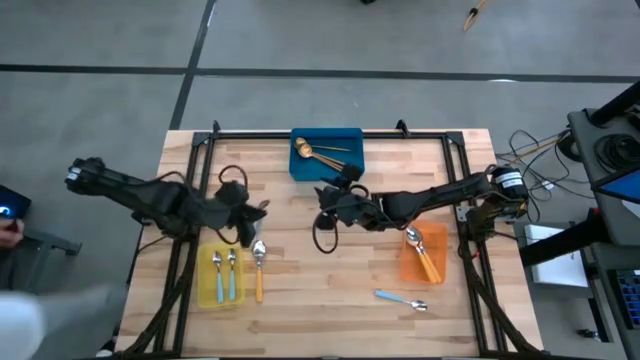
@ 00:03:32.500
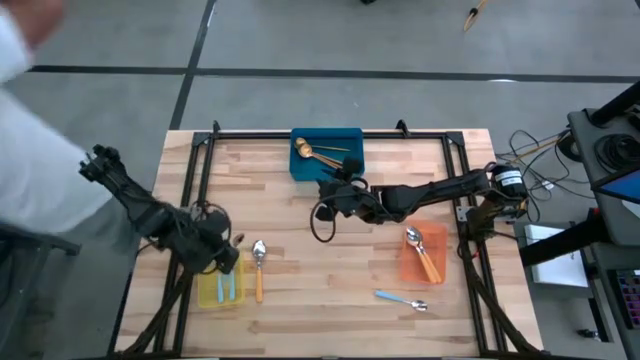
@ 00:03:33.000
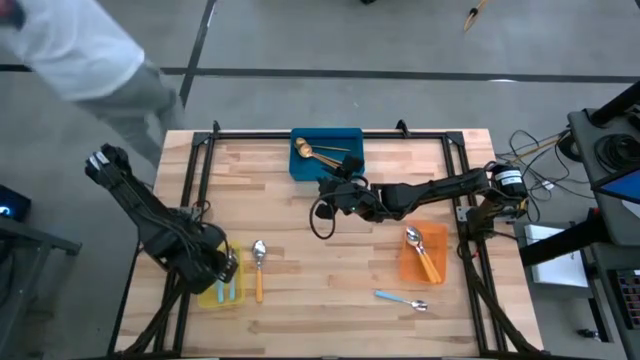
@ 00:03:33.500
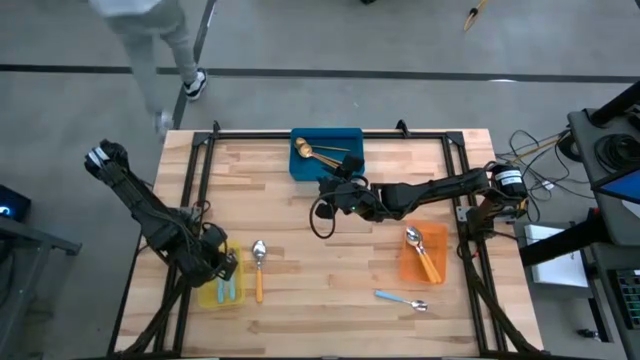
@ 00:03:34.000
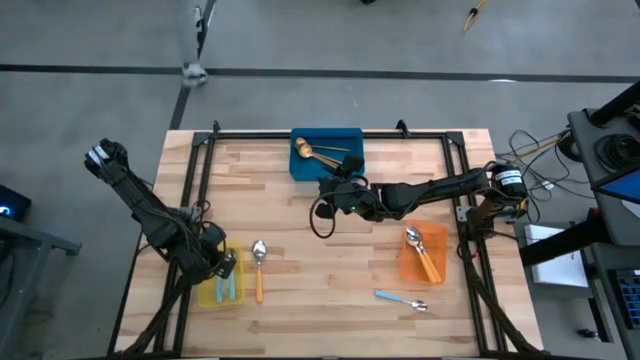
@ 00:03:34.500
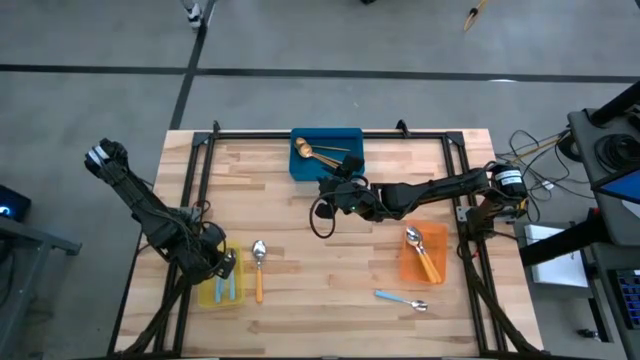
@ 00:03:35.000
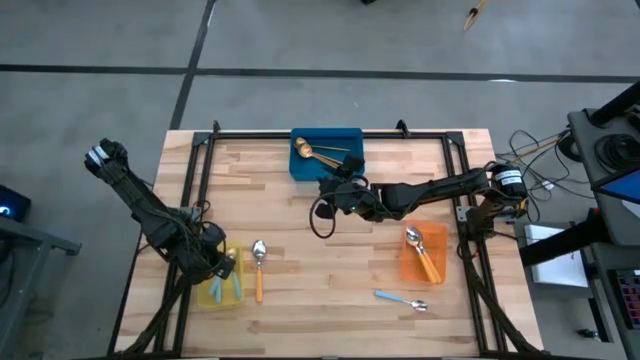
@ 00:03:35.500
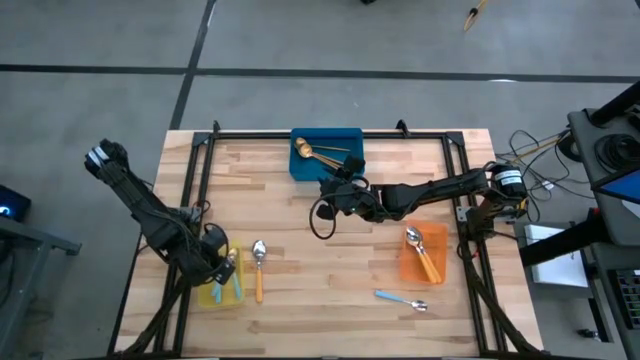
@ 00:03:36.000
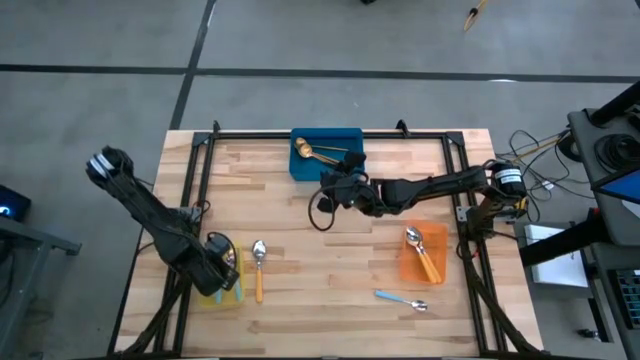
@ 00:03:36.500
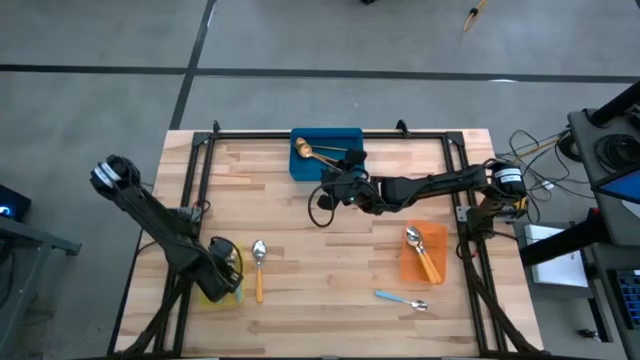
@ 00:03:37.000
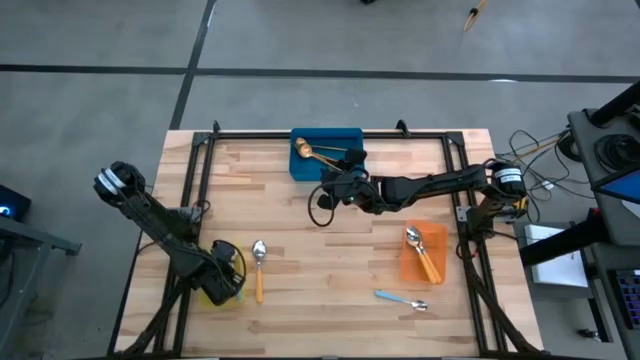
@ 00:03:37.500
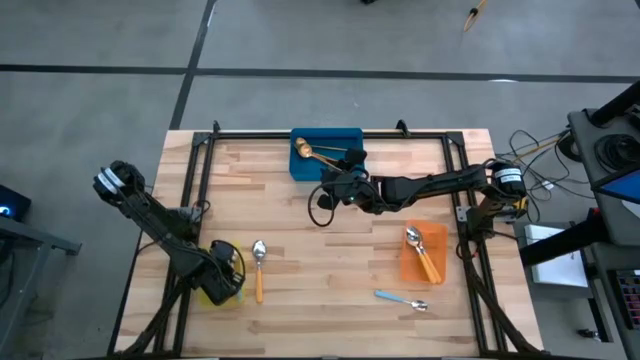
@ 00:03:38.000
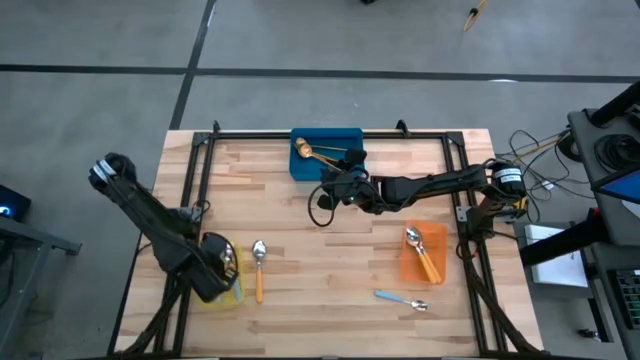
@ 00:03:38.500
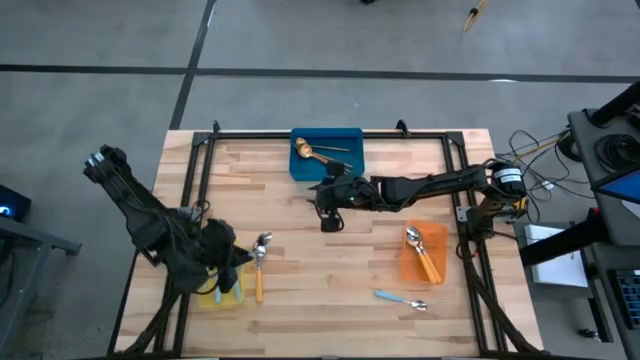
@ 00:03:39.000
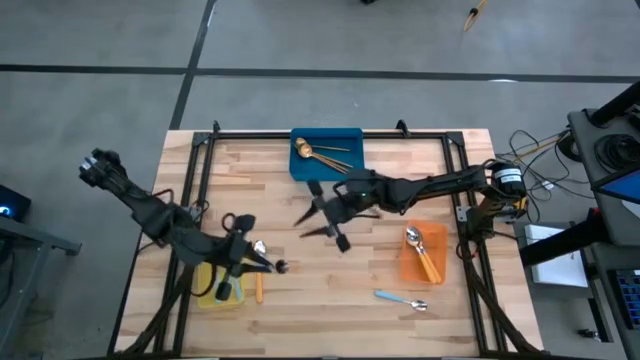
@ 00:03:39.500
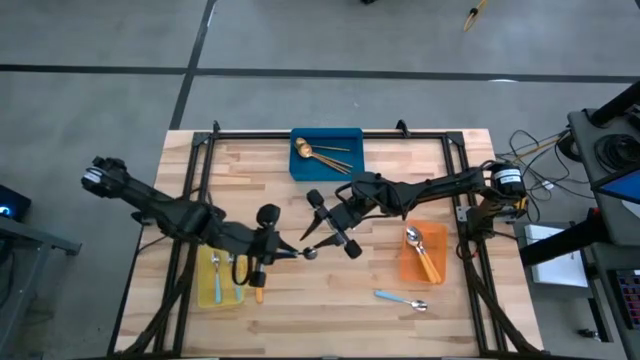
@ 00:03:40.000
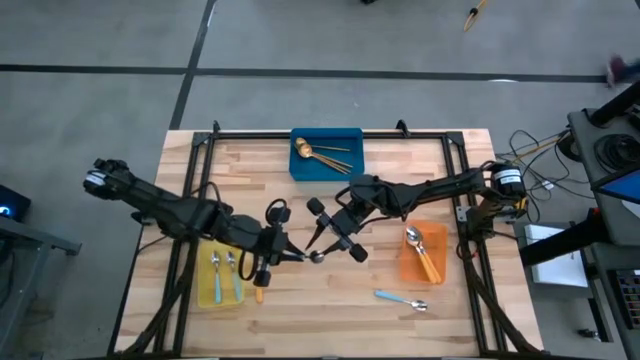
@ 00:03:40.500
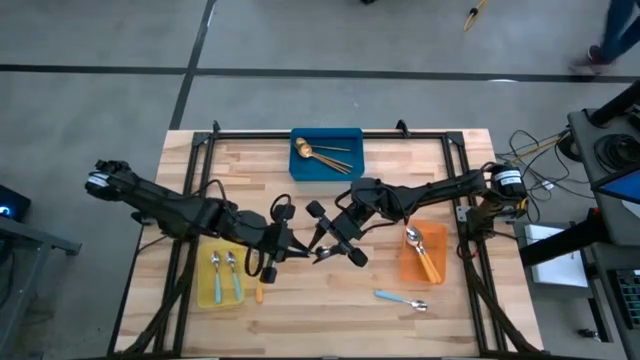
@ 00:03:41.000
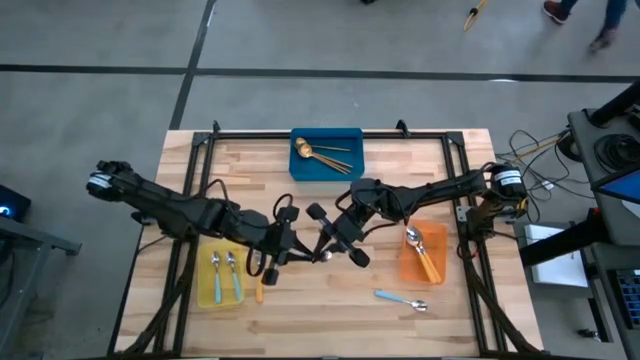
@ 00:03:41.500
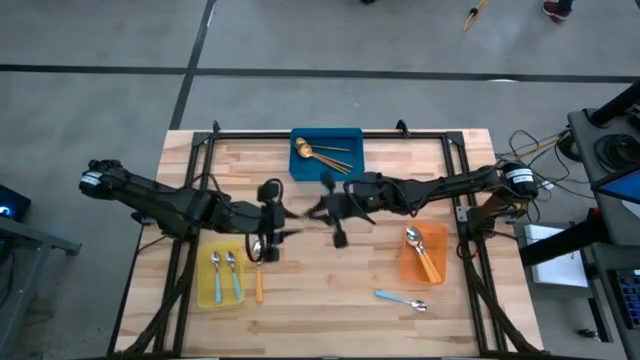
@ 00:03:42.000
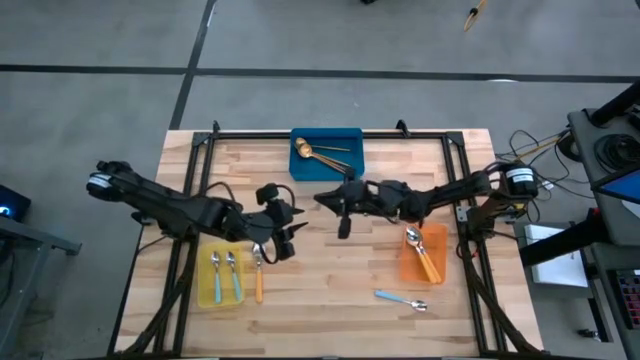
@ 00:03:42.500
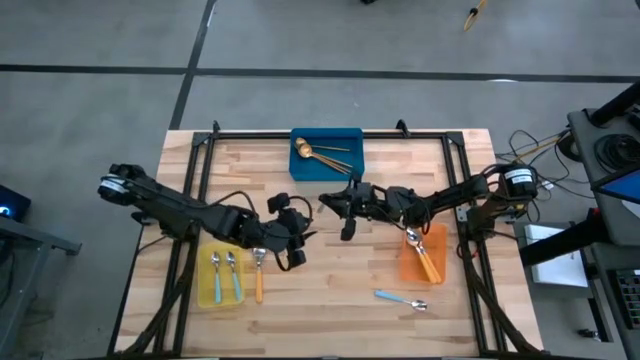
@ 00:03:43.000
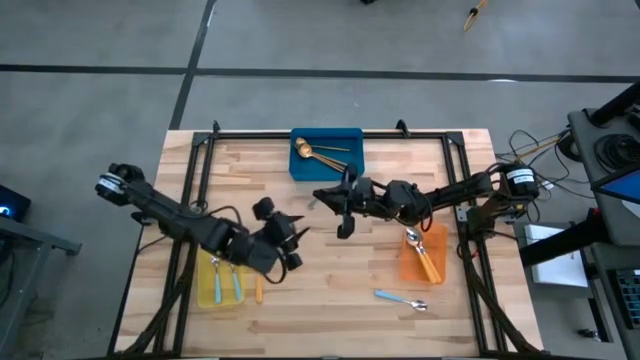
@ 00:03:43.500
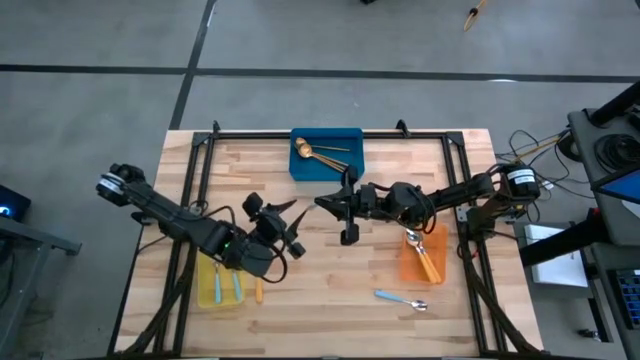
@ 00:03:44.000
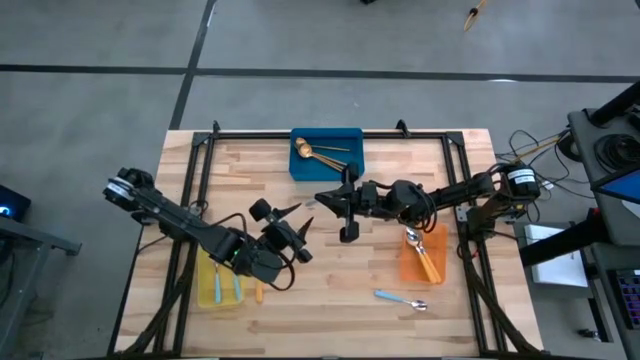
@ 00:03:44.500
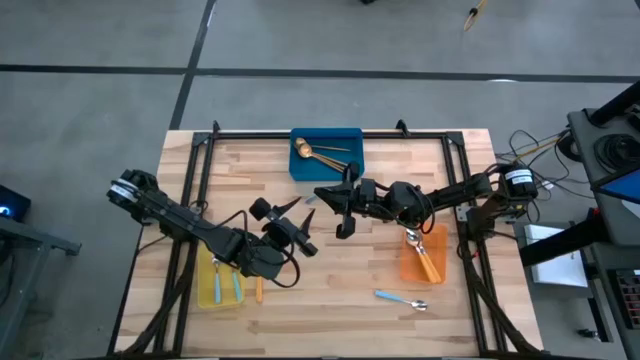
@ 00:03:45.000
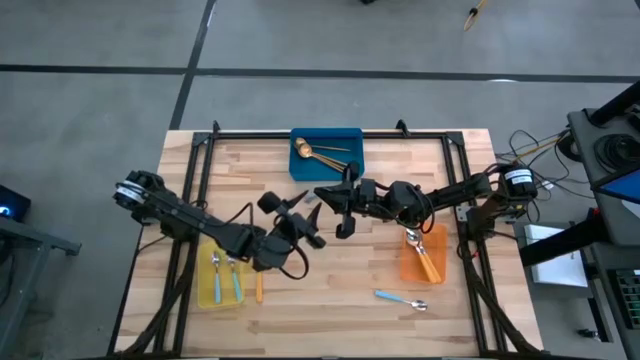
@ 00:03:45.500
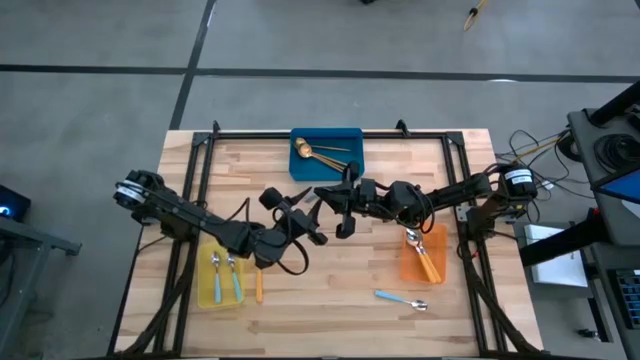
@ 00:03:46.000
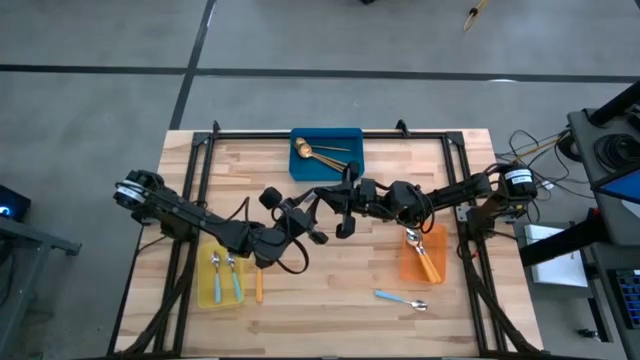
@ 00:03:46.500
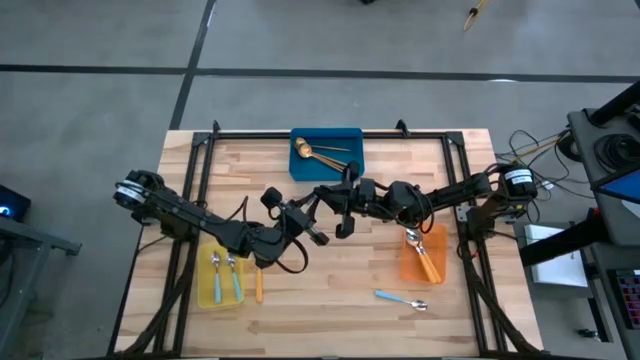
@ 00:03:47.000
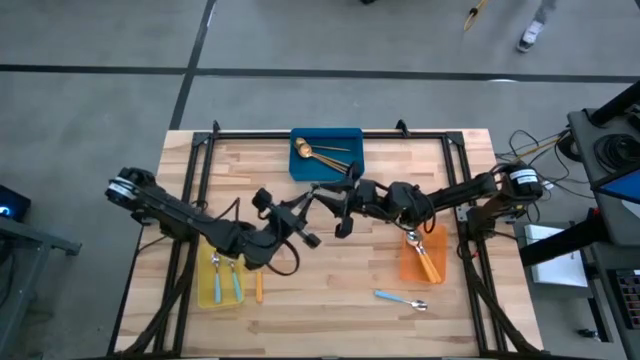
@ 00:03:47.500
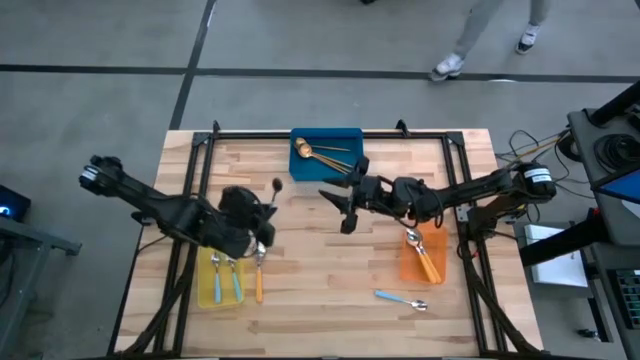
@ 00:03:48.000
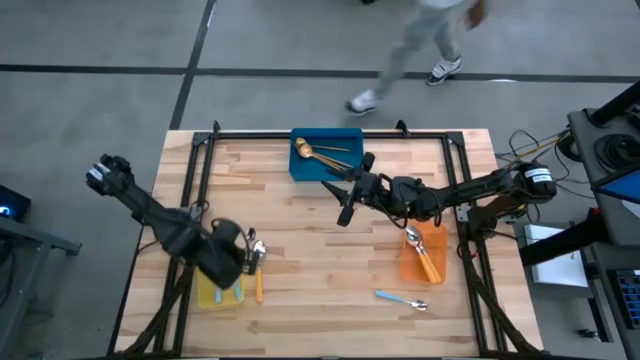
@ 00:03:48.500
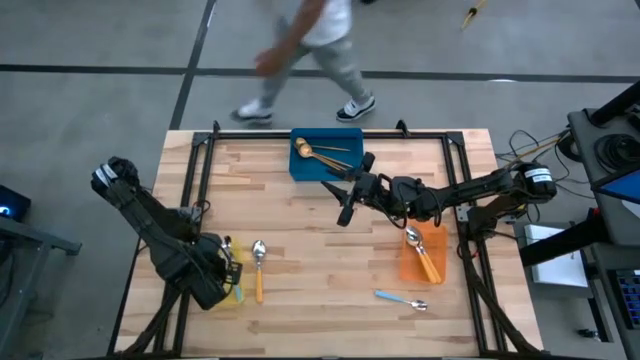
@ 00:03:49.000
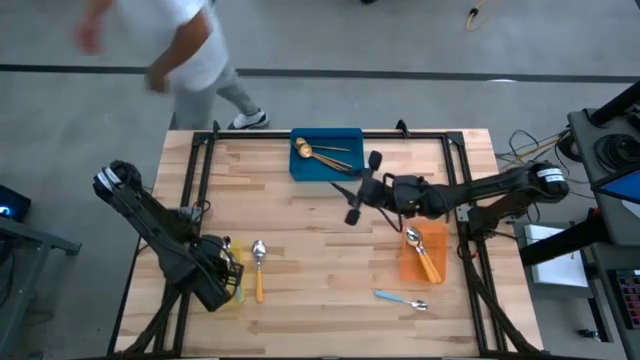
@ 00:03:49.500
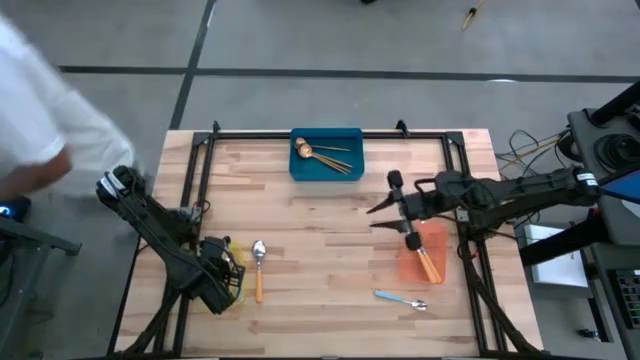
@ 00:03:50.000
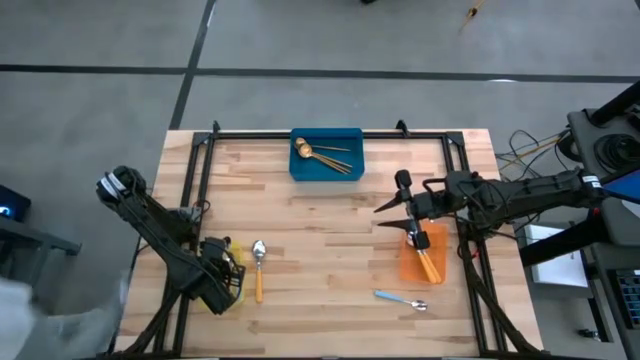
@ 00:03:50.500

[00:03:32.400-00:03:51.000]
Task: Sort silverware by color (type)
Put the blue spoon into the yellow bin

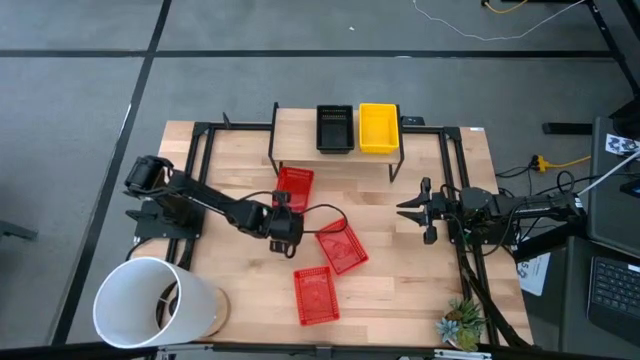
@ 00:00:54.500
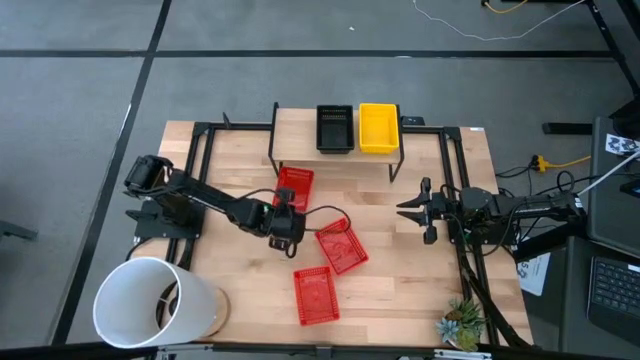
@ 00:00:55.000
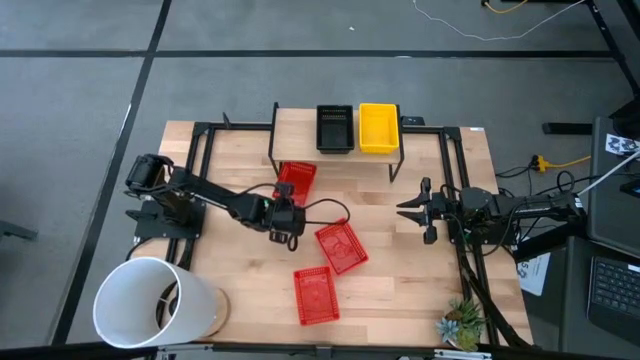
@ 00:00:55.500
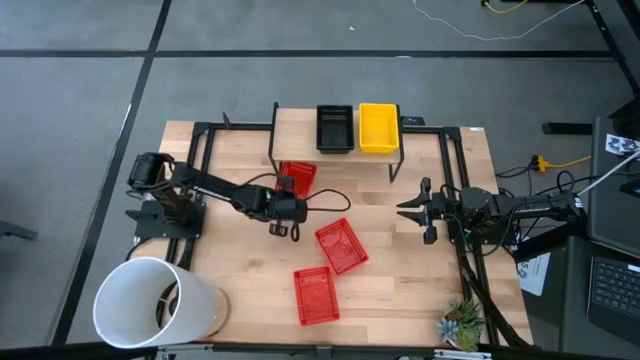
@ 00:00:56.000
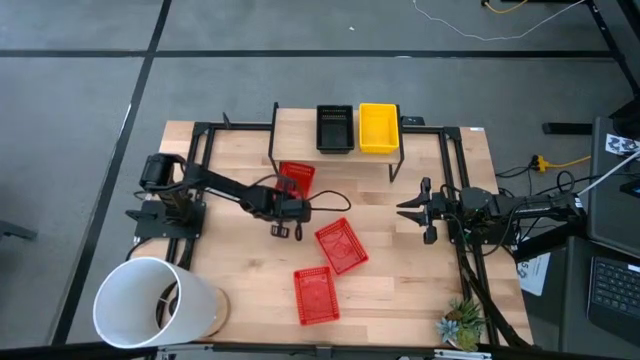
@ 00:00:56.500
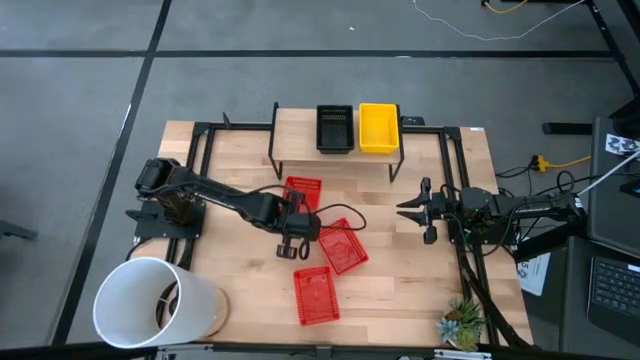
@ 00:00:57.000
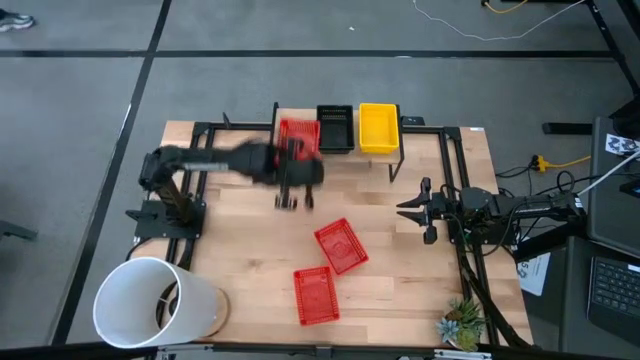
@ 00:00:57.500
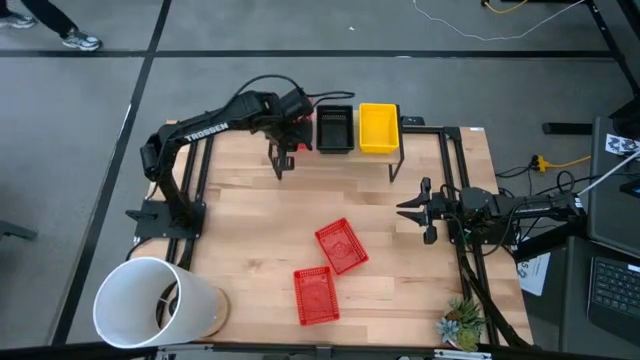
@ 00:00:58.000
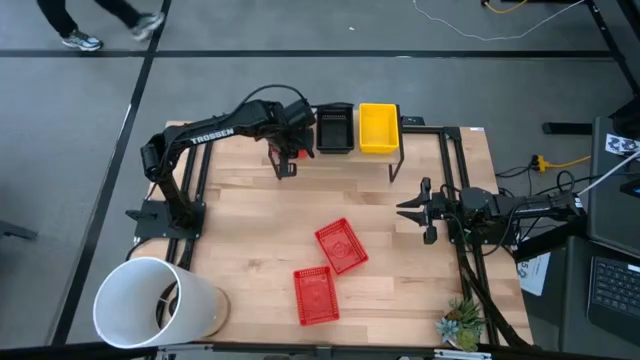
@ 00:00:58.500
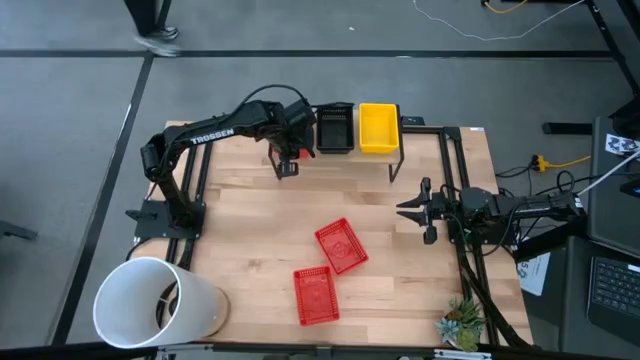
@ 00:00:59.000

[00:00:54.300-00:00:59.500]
Task: Stack baskets on shelf by color
Put the top red basket on the shelf
